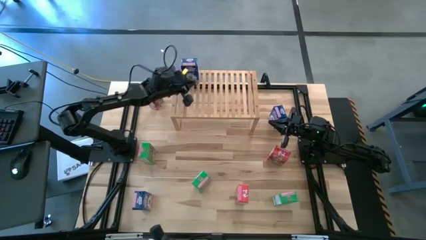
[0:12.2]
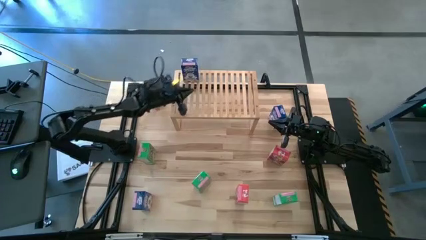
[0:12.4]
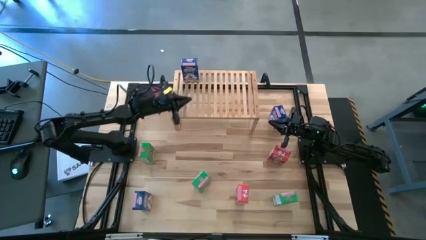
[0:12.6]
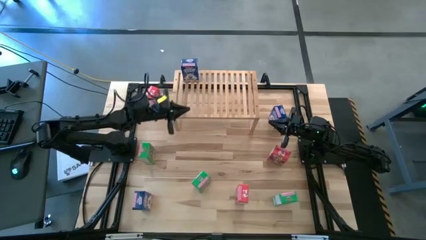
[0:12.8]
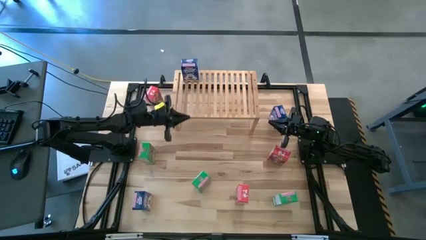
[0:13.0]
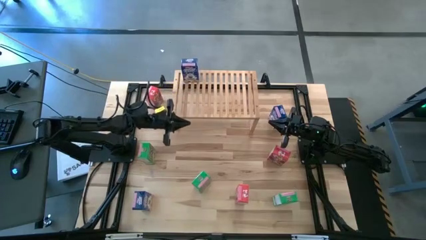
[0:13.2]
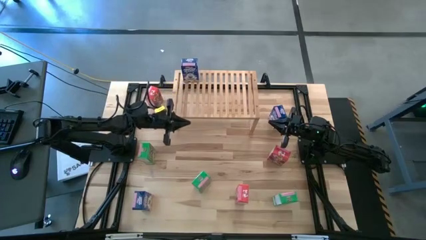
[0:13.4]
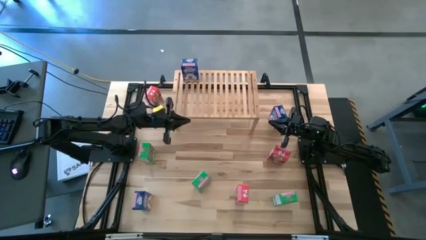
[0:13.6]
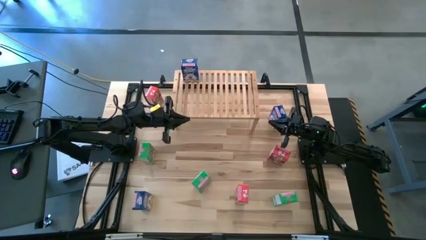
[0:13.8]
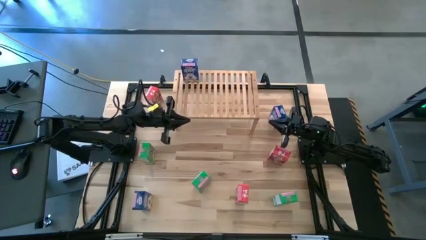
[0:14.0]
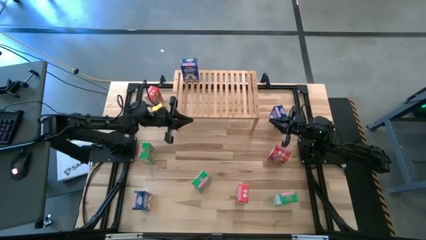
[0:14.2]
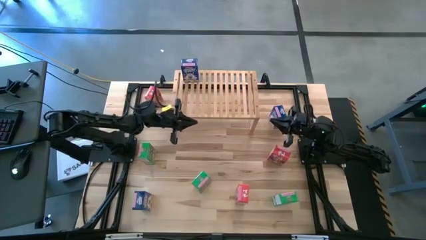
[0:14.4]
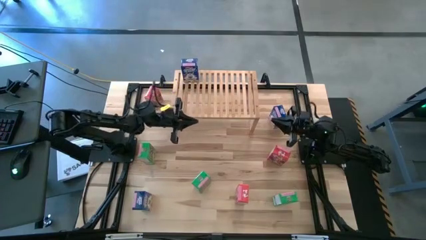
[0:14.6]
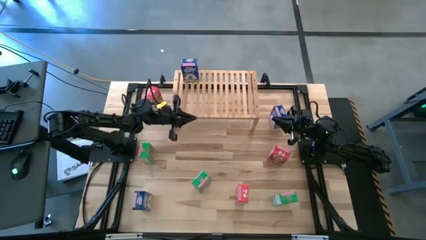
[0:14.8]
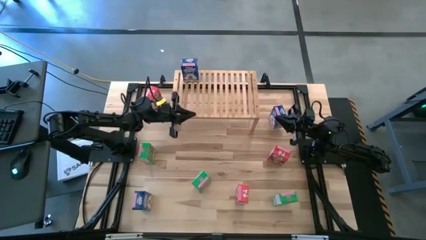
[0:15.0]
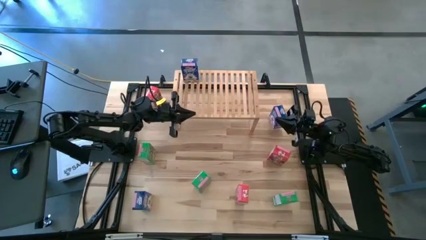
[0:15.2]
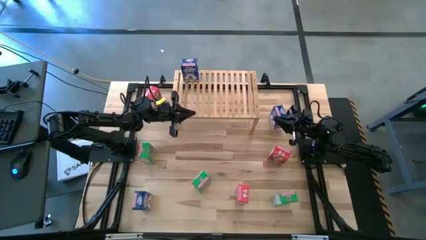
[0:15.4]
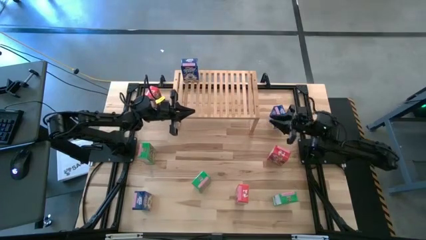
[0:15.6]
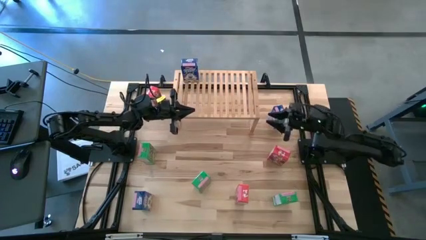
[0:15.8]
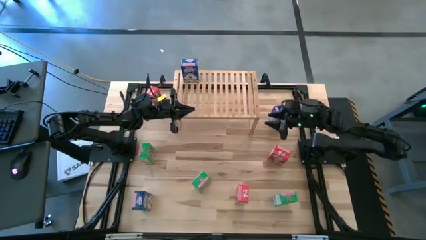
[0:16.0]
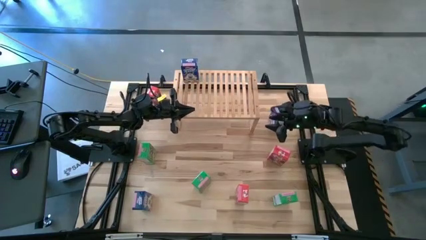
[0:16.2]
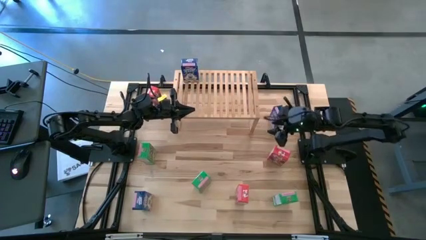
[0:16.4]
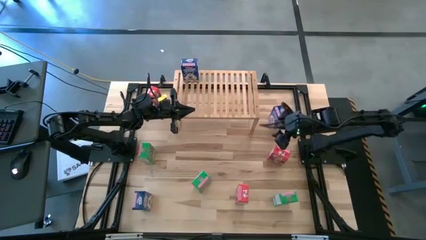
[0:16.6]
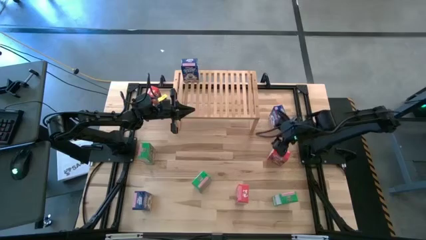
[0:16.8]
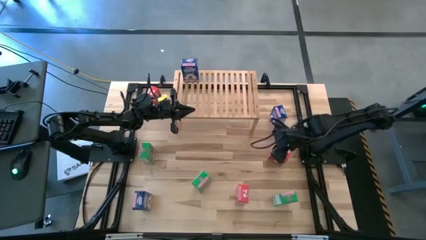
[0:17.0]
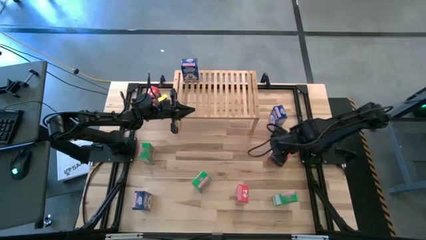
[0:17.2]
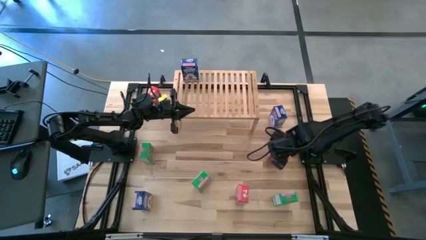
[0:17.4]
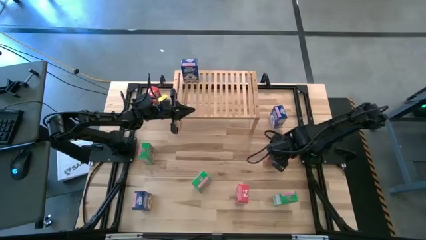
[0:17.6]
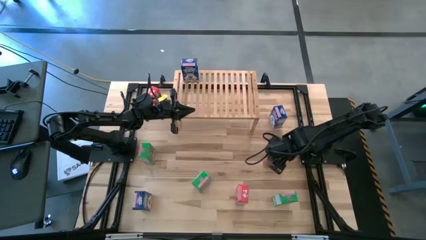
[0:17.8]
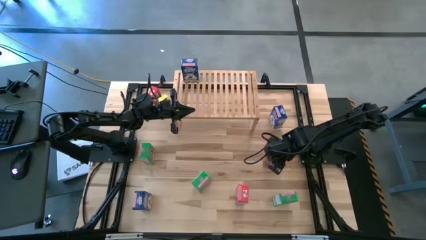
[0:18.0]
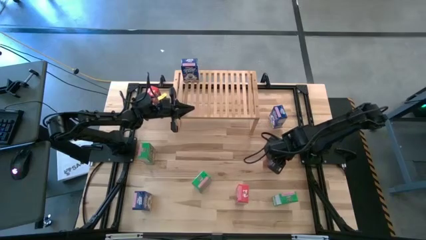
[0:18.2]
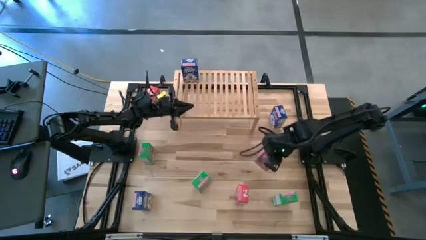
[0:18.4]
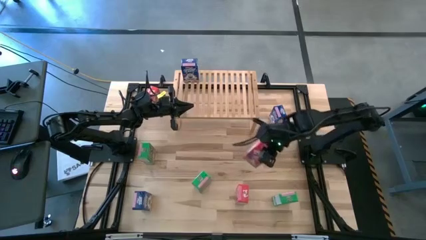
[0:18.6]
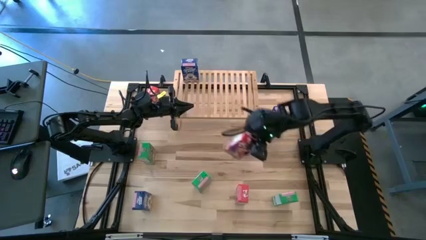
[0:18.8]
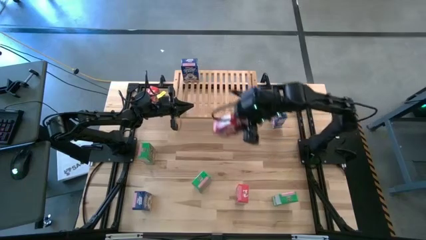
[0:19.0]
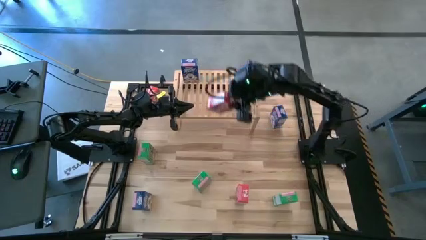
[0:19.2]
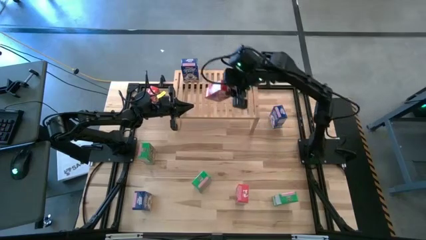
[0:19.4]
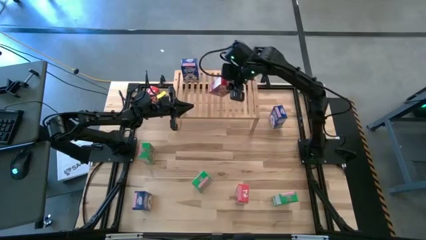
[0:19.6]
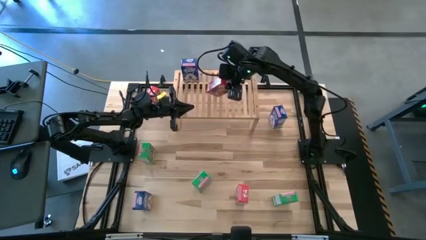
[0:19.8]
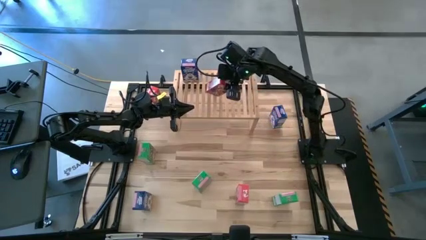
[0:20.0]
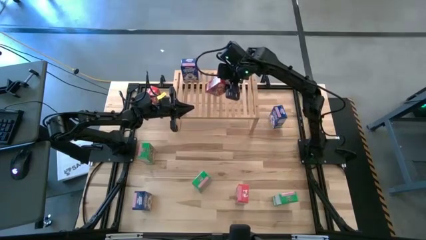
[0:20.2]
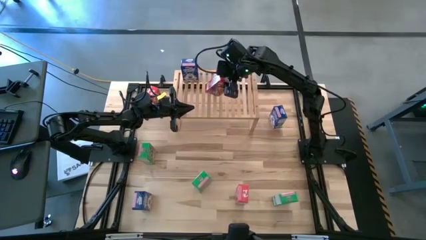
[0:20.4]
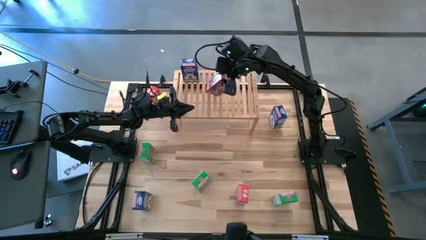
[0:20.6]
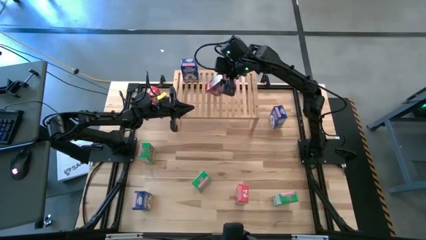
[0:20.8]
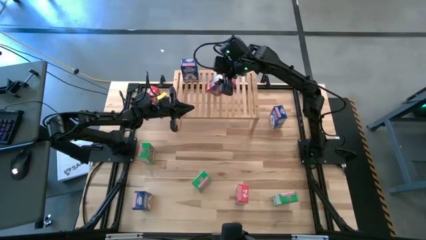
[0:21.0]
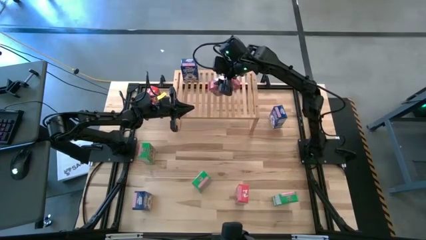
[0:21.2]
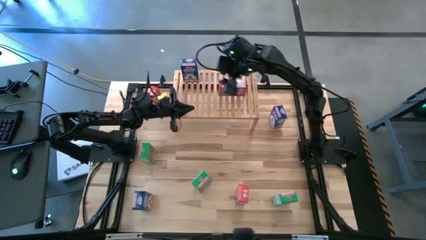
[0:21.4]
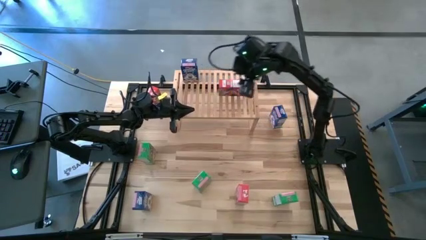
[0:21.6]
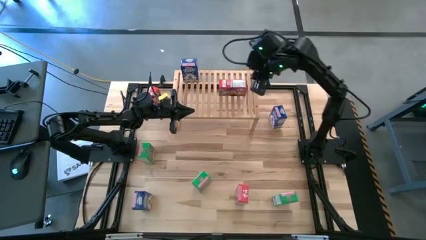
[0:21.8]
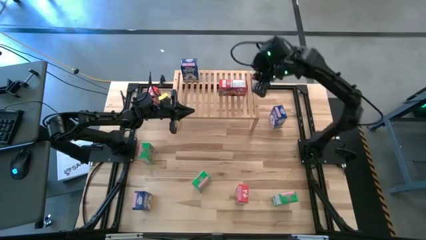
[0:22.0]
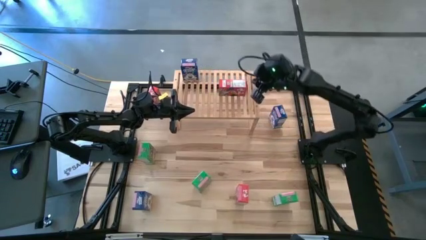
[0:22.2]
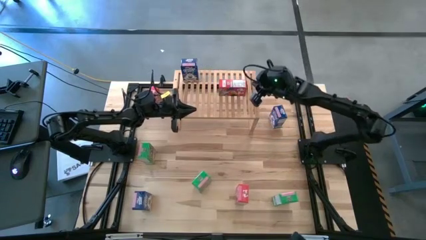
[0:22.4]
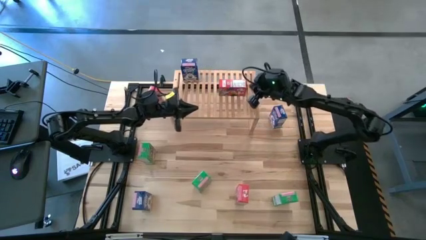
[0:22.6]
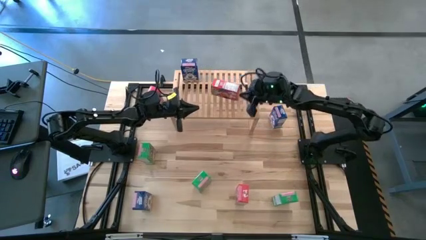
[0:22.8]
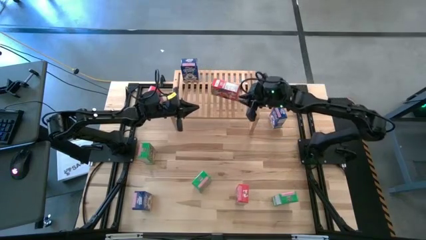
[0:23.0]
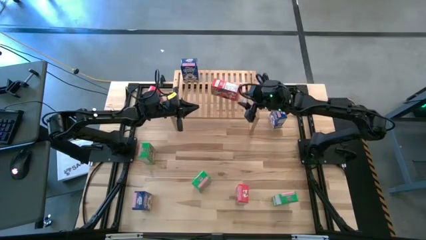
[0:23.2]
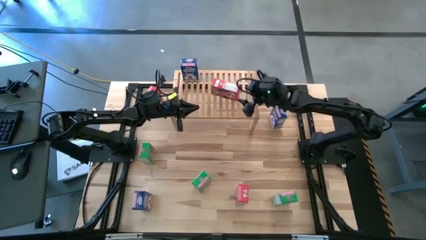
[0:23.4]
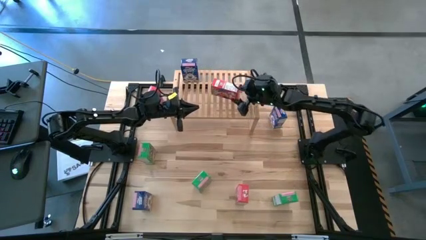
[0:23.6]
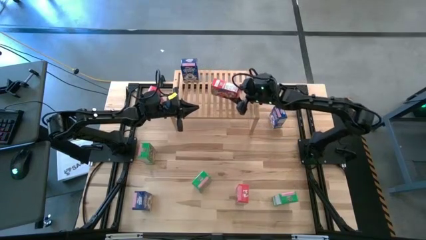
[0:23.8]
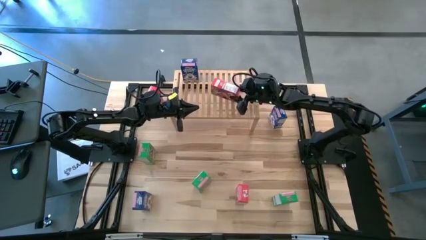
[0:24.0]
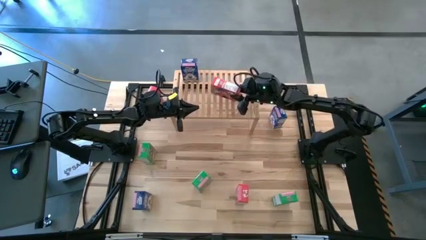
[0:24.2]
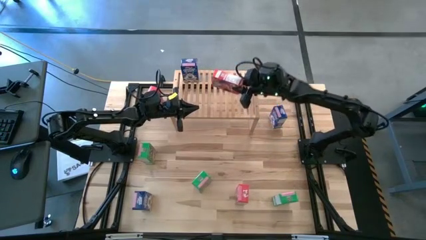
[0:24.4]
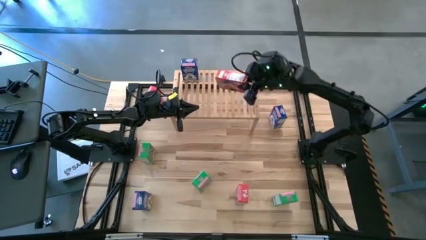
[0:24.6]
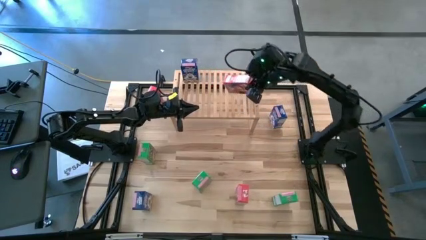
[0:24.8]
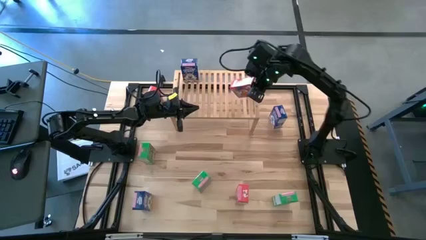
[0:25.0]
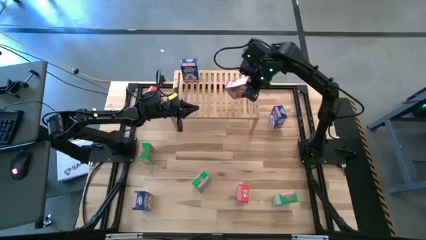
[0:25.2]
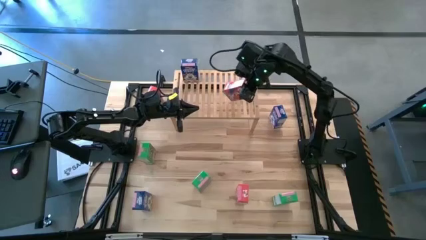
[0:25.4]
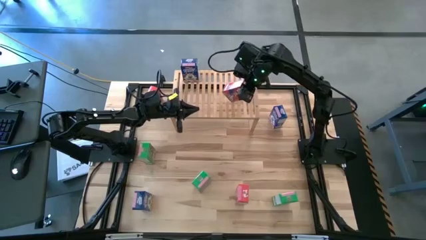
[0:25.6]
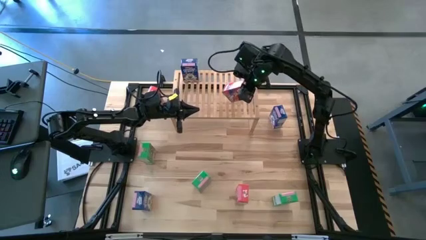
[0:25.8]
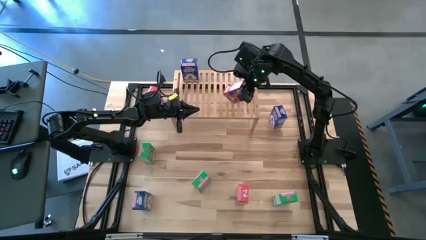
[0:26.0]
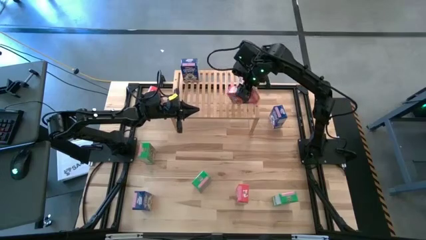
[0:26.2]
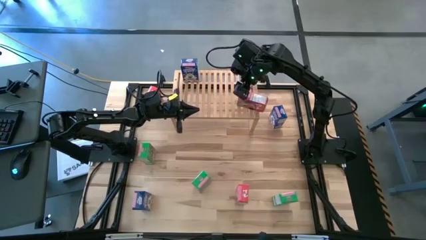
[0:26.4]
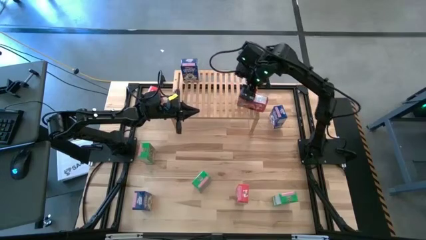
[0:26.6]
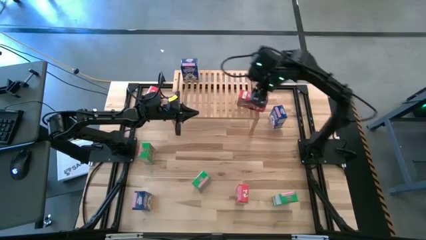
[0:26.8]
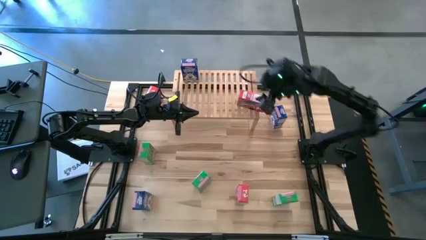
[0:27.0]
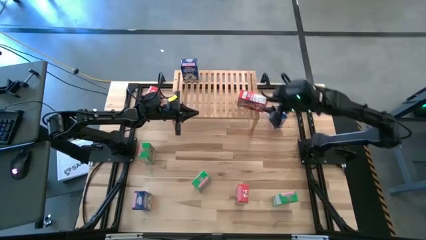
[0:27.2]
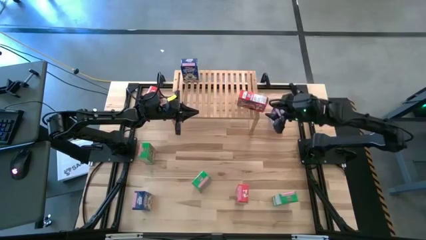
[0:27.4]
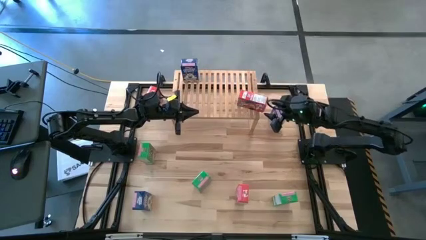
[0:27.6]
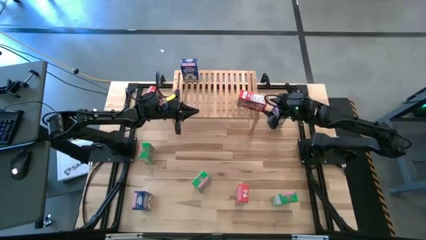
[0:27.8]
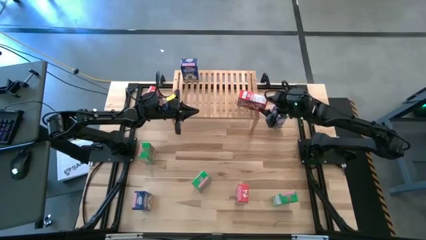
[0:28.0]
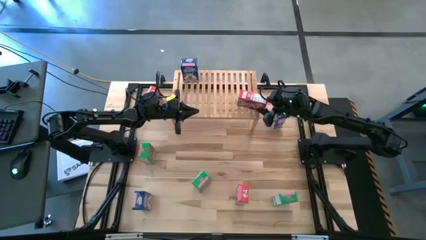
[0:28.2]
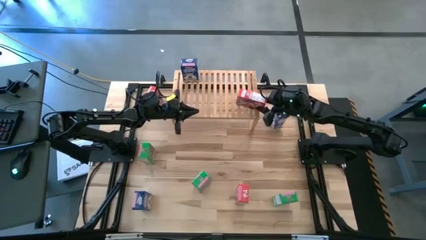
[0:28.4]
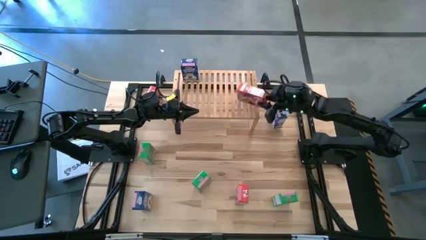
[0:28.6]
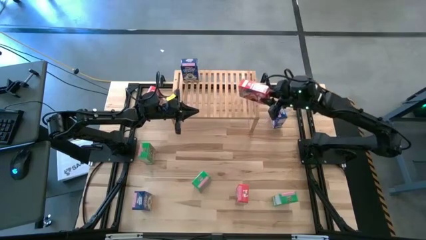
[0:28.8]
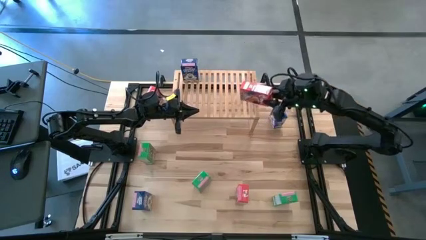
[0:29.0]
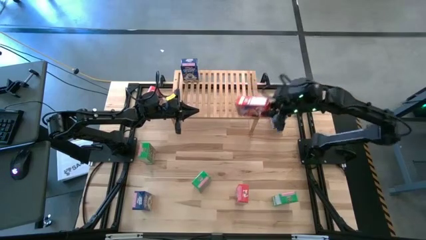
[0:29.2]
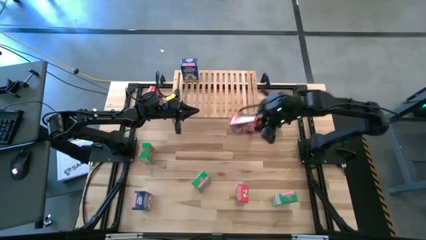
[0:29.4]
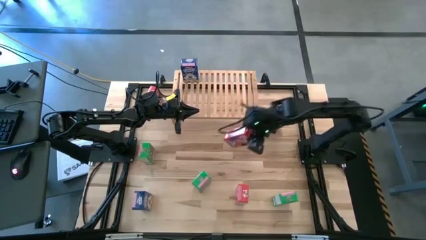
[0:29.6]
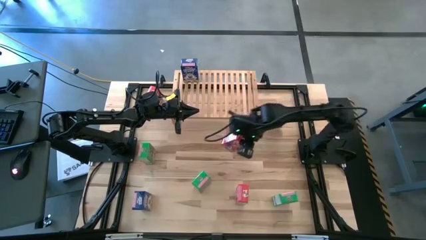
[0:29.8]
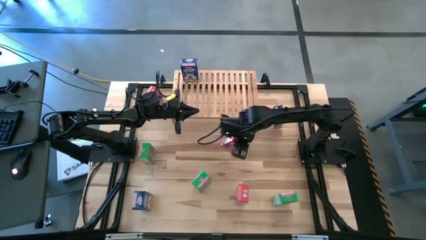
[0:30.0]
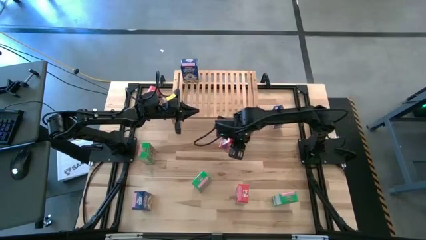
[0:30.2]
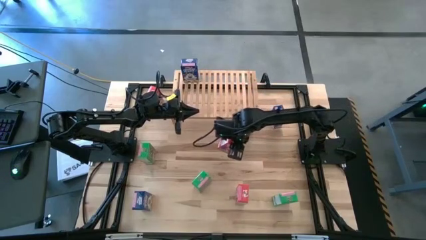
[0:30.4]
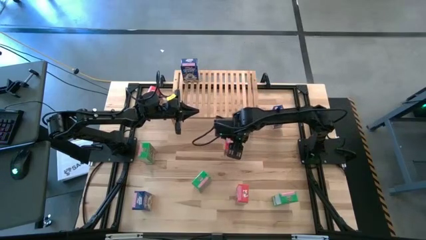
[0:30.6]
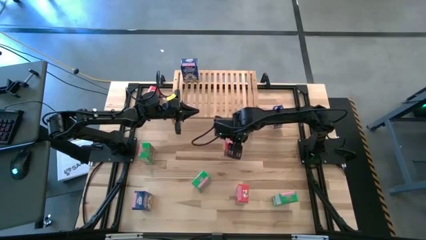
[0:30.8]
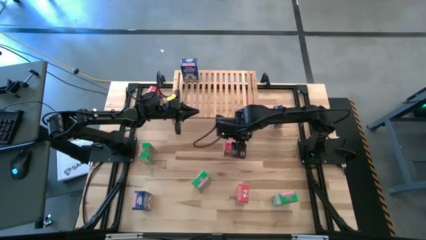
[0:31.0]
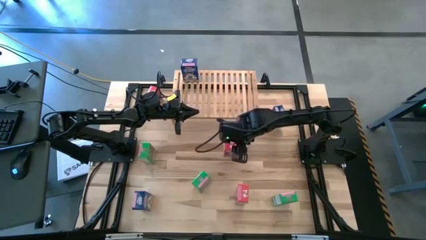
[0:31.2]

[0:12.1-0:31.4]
Task: Stack cereal on shelf
Put the middle red cereal box on the shelf
